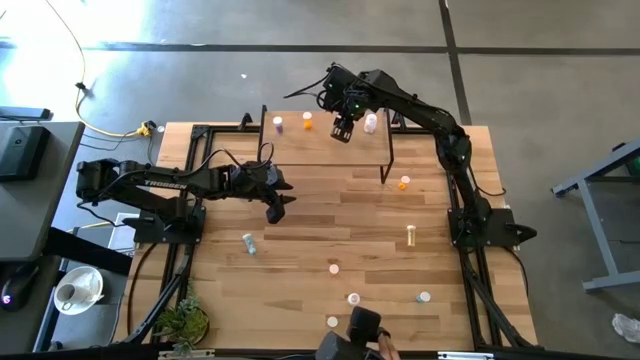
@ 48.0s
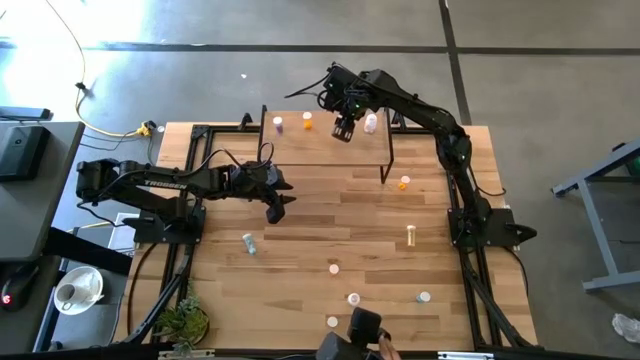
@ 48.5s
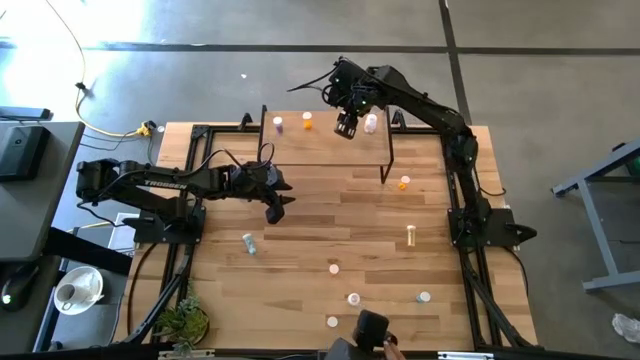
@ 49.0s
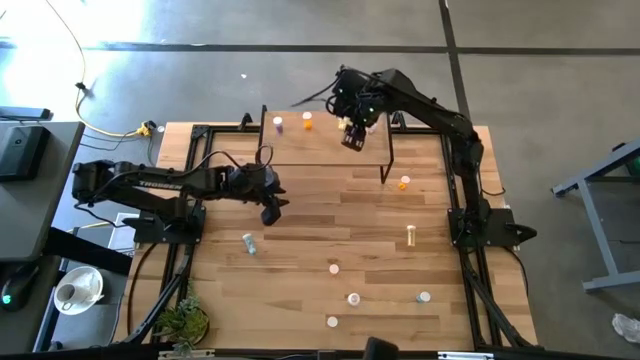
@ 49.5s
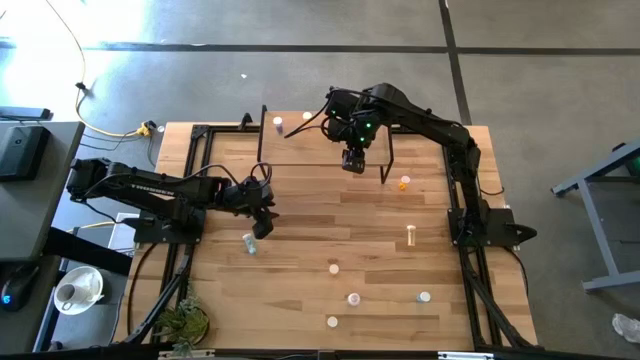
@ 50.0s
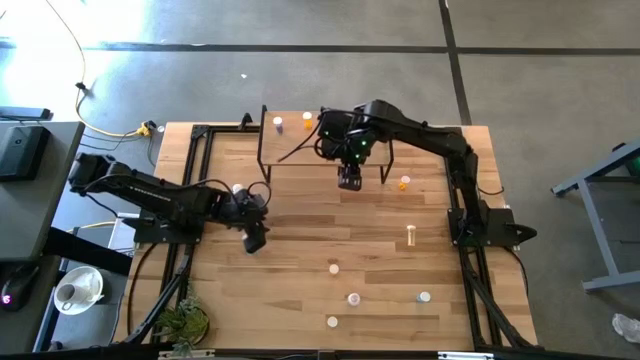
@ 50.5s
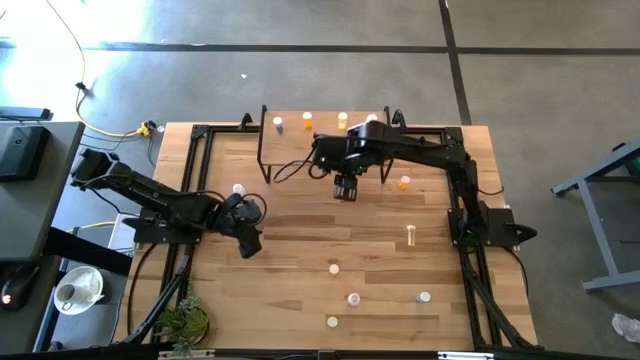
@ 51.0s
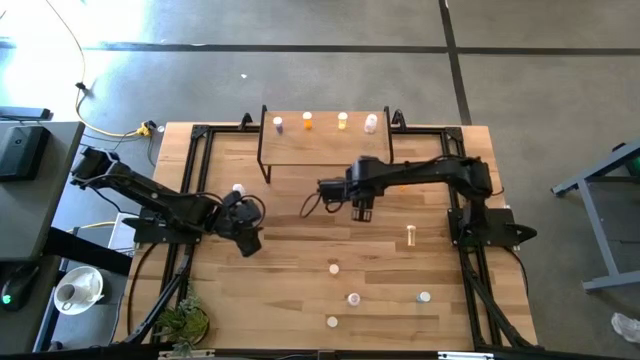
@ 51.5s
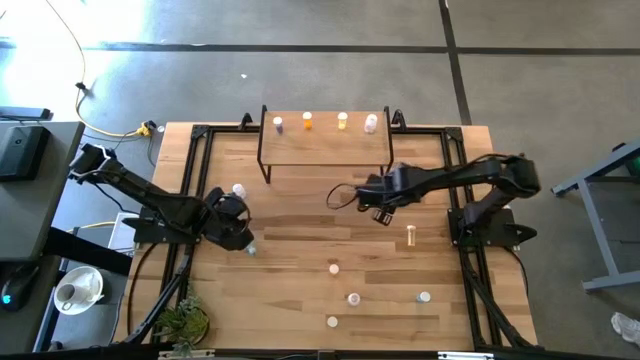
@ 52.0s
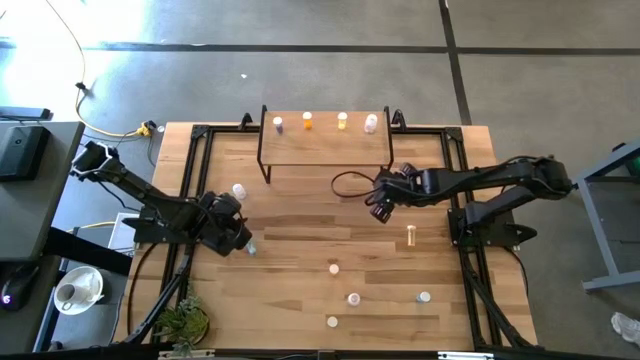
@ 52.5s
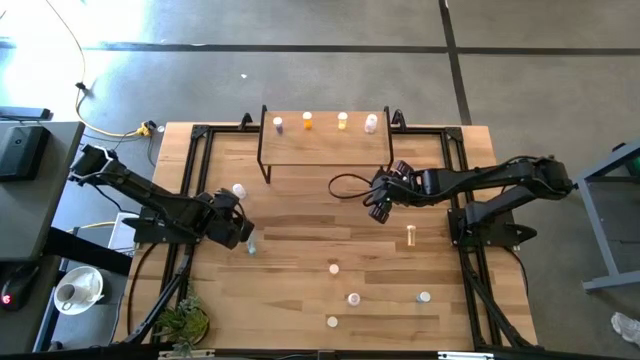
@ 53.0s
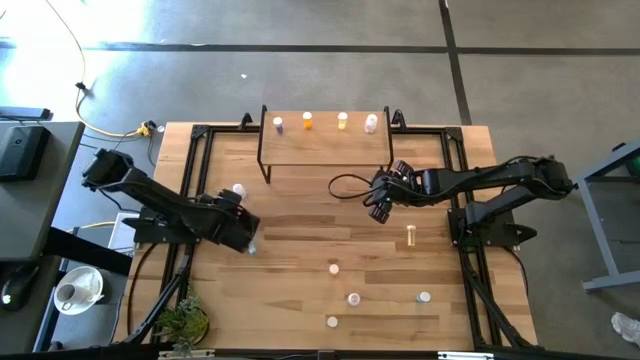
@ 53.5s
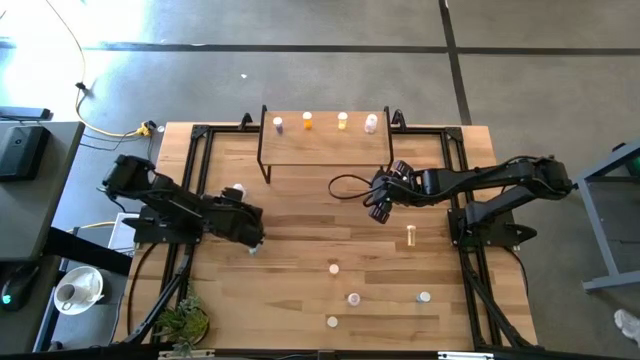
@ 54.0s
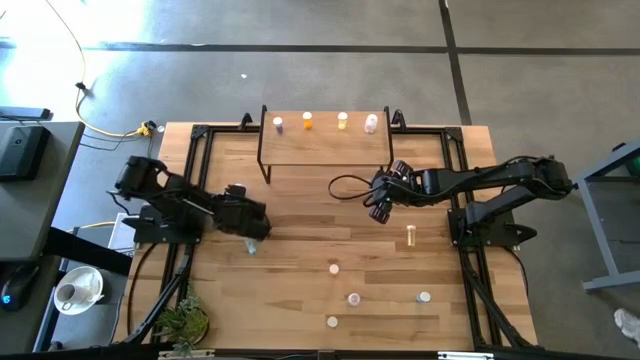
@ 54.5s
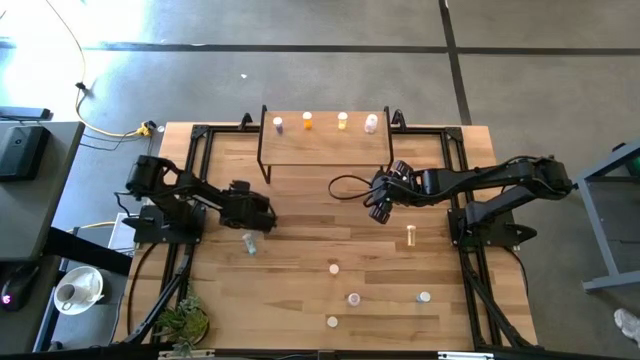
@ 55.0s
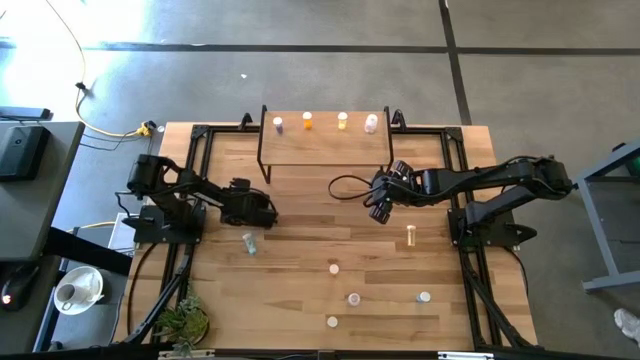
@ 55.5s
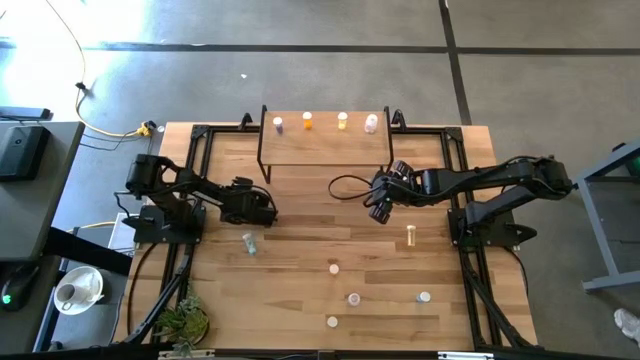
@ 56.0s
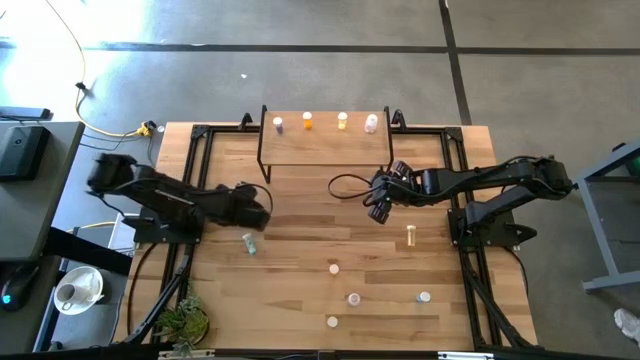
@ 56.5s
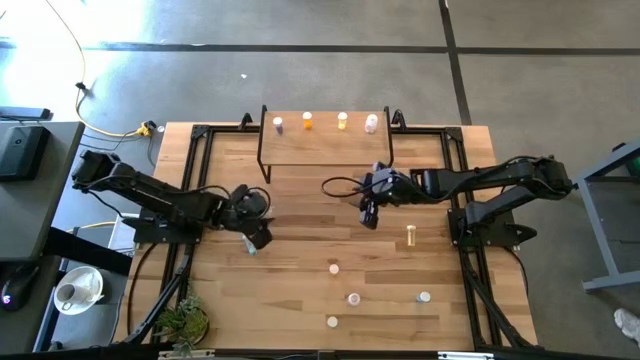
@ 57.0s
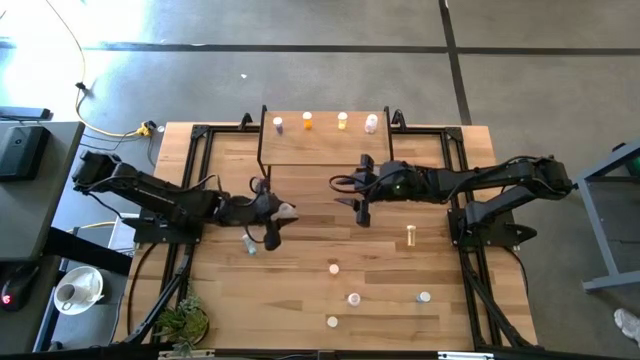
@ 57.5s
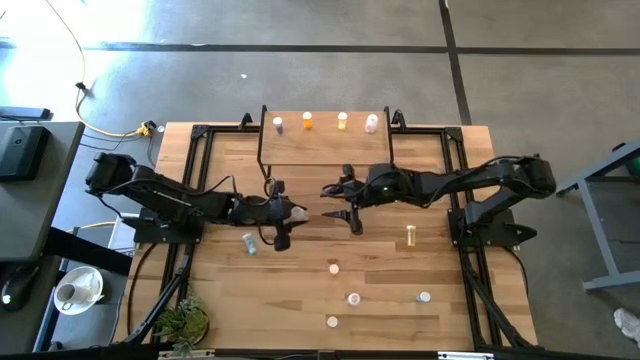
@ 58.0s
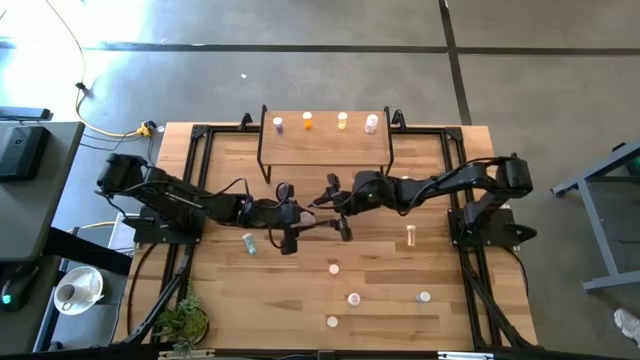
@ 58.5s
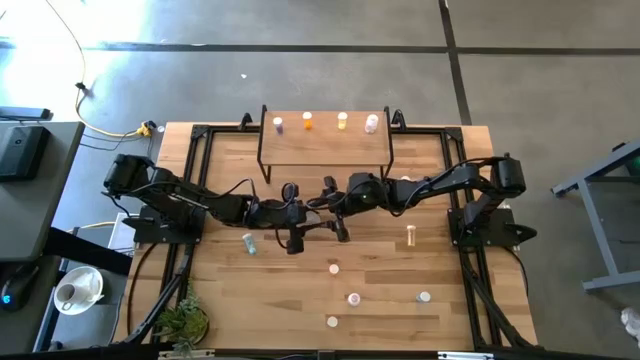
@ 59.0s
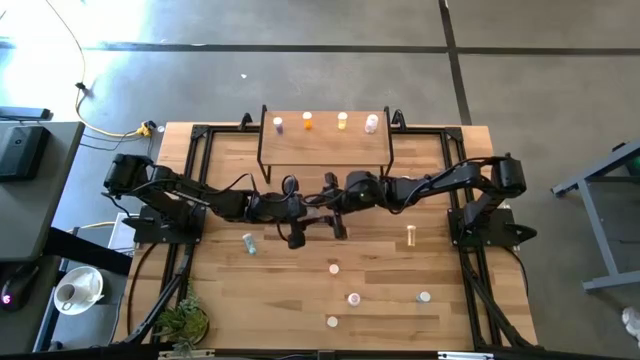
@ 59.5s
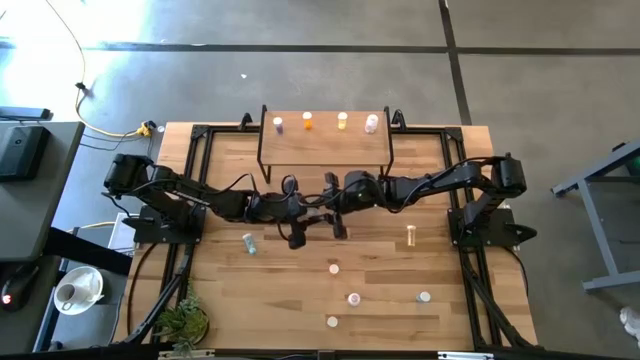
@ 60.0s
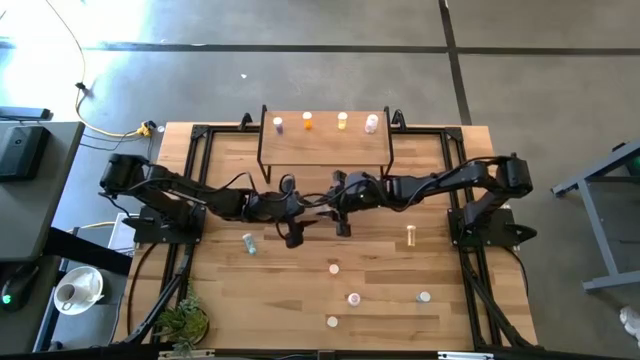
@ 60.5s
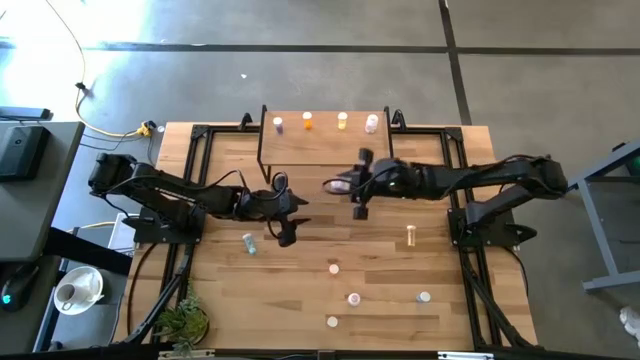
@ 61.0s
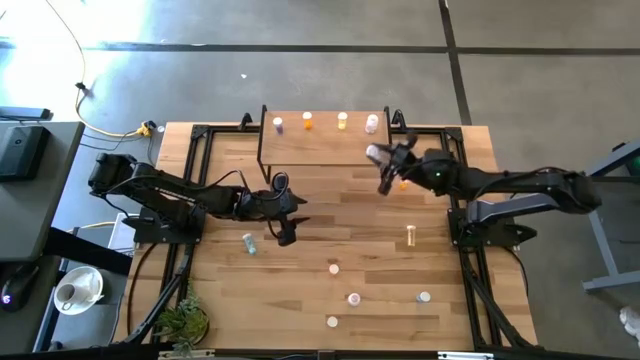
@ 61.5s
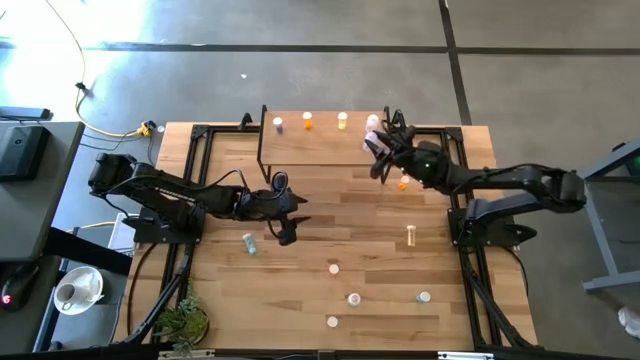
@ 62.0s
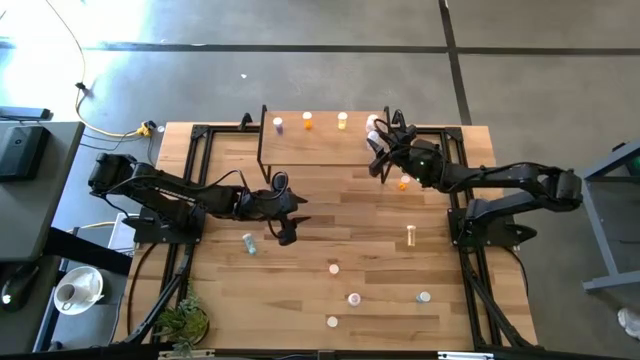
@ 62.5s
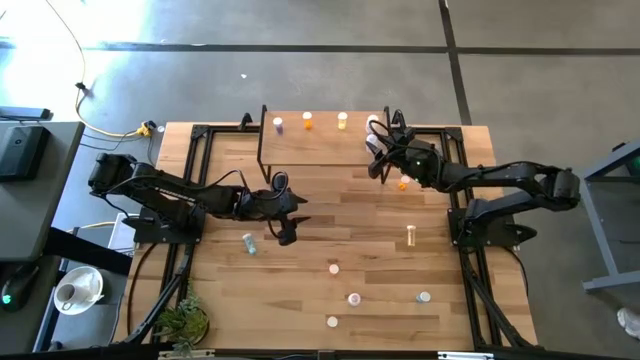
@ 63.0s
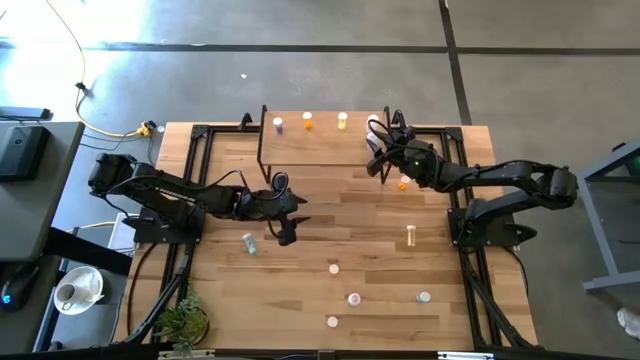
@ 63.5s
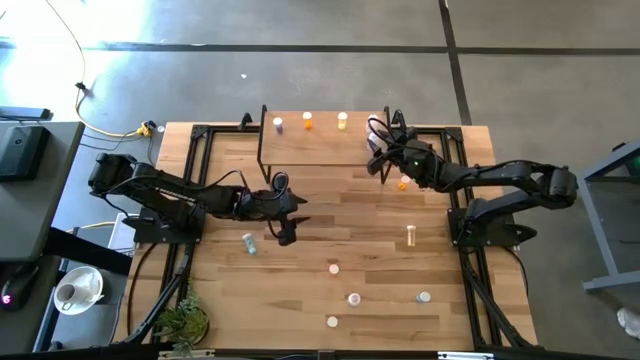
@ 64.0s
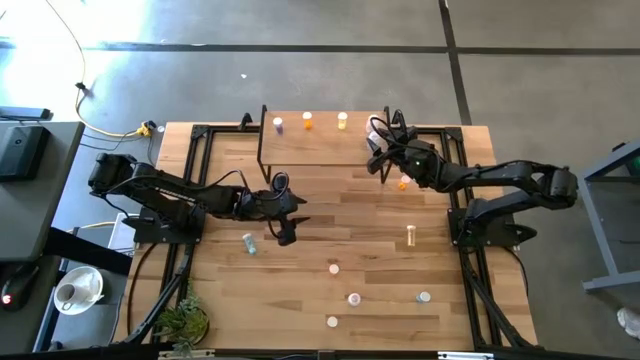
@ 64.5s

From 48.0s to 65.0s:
Task: Pick and place medicine bottles onto shelf by color
Put the top white pill bottle on the shelf aligned with the other white pill bottle

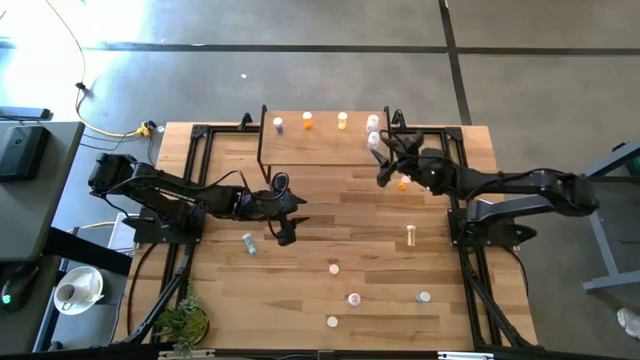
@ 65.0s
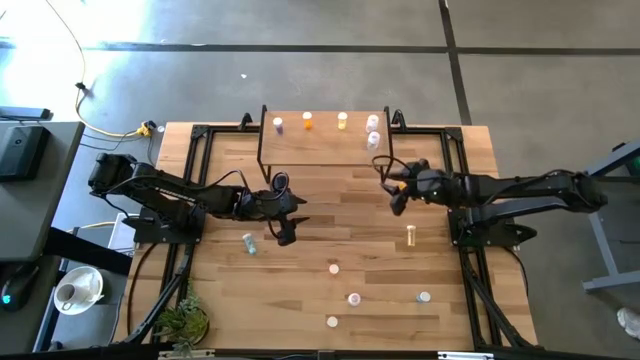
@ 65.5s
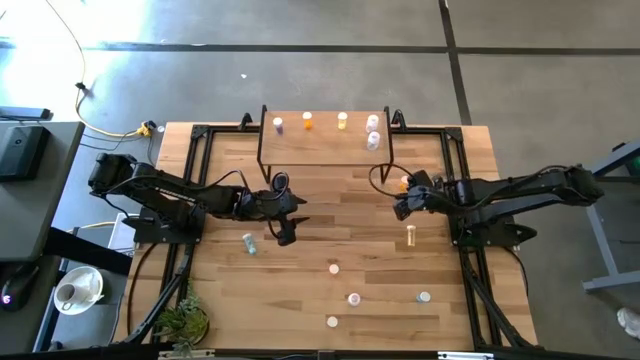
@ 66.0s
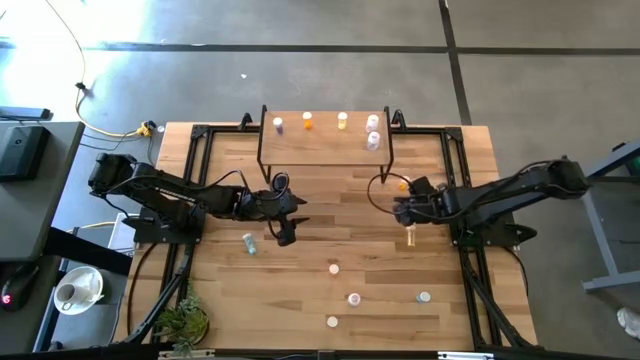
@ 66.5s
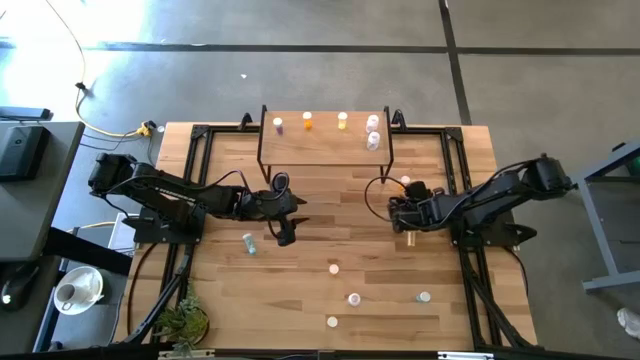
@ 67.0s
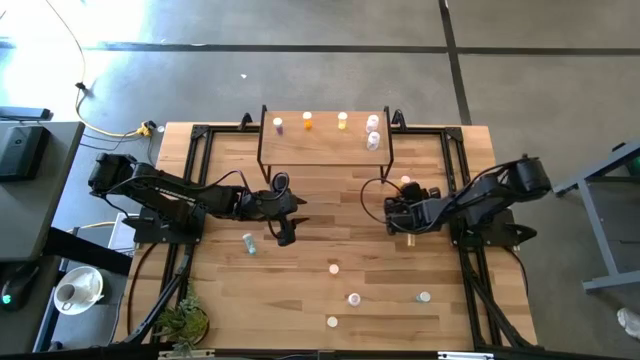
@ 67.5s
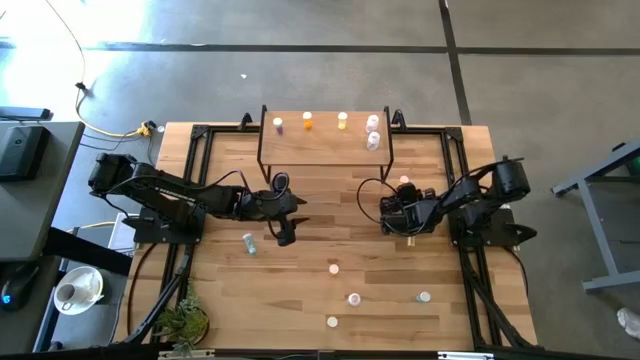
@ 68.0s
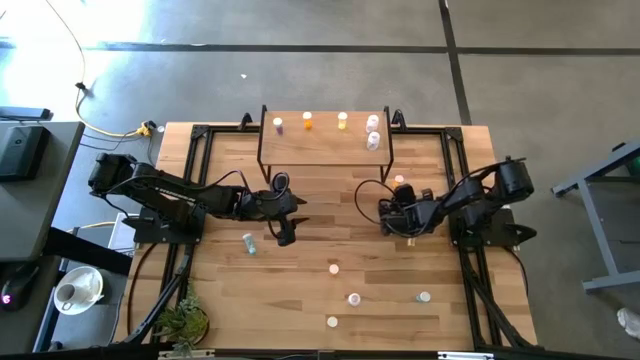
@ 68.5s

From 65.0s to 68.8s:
Put the top orange pill bottle on the shelf aligned with the other orange pill bottle

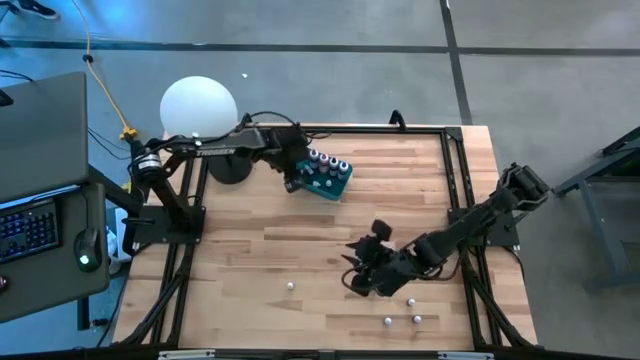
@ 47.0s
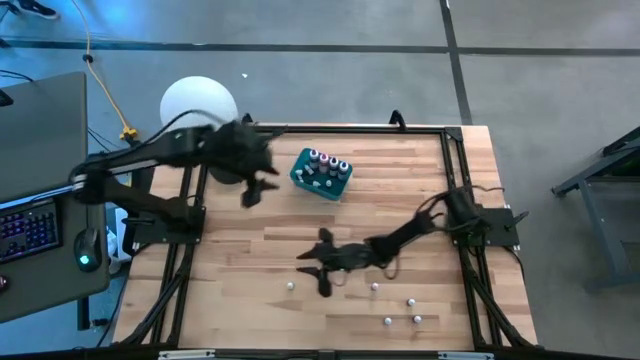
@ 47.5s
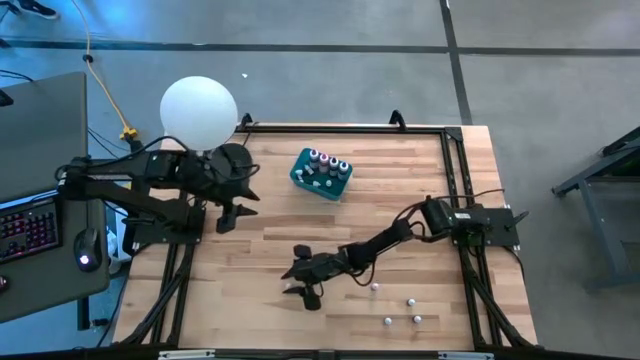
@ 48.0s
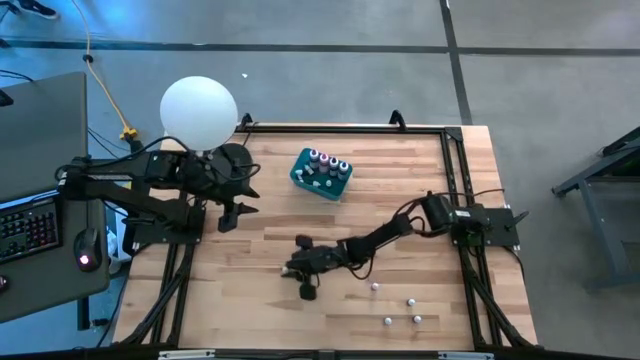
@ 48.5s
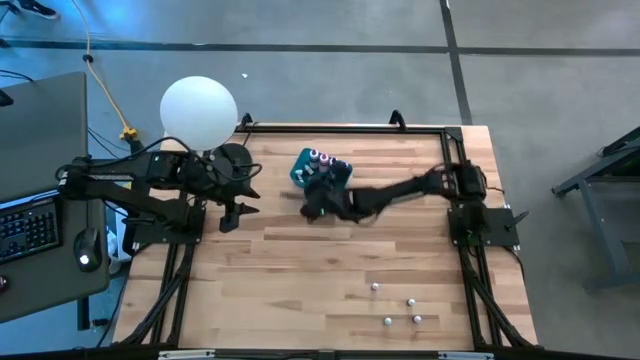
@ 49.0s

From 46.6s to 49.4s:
Task: Pick & Place food coloring
Put the black food coloring bottle into the blue bin
